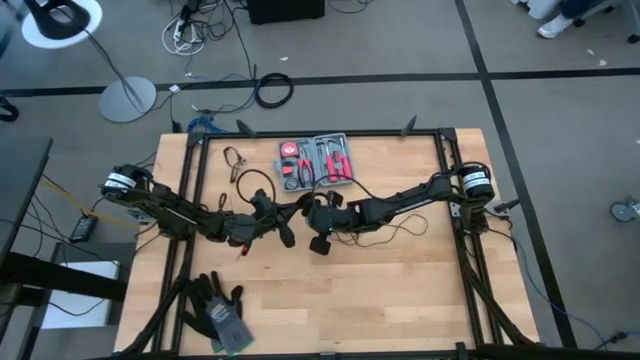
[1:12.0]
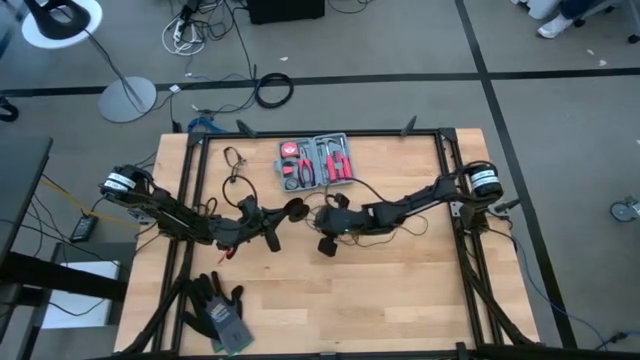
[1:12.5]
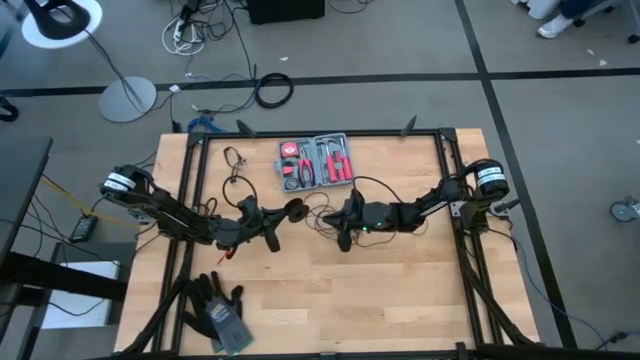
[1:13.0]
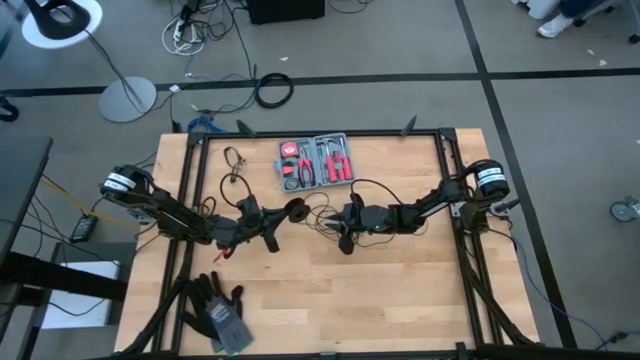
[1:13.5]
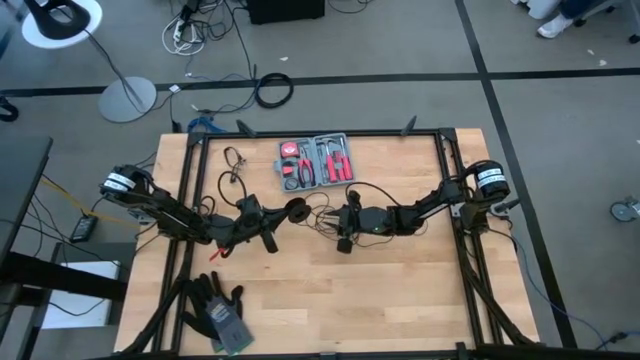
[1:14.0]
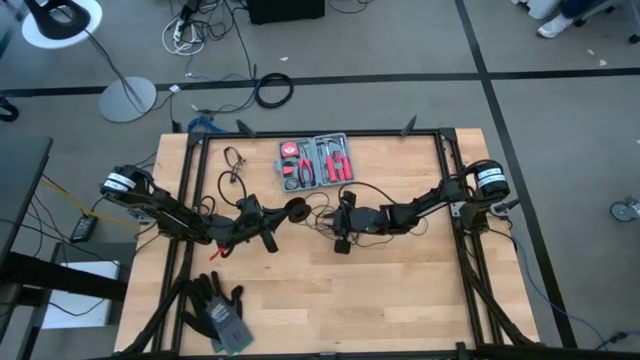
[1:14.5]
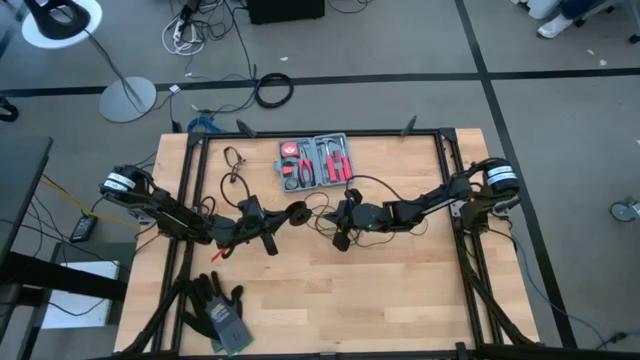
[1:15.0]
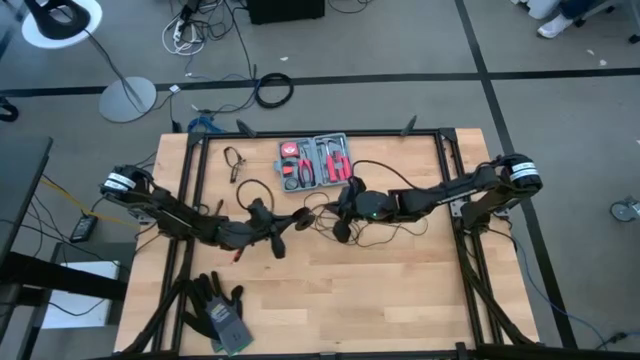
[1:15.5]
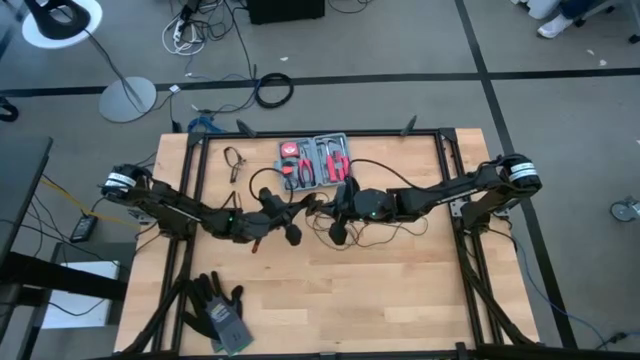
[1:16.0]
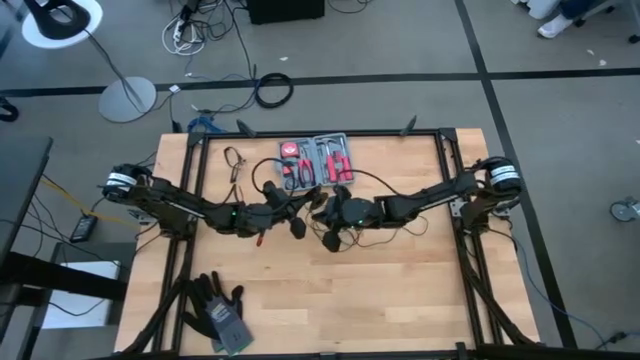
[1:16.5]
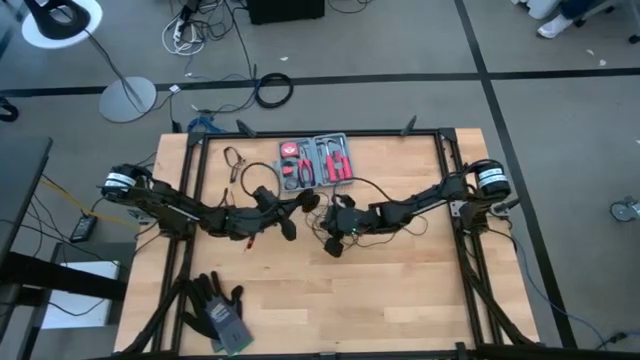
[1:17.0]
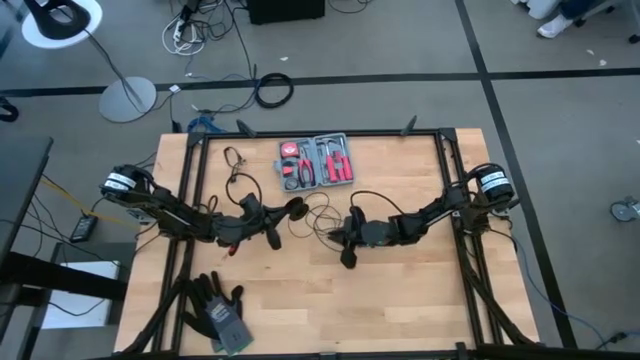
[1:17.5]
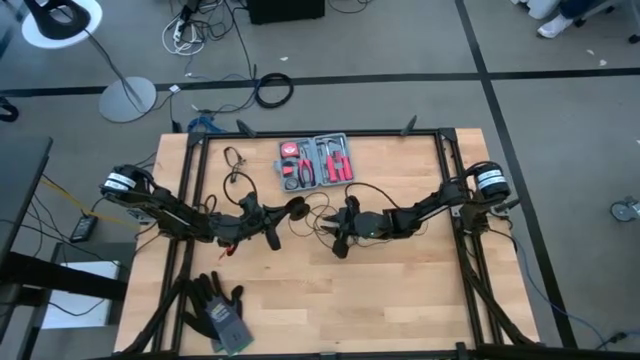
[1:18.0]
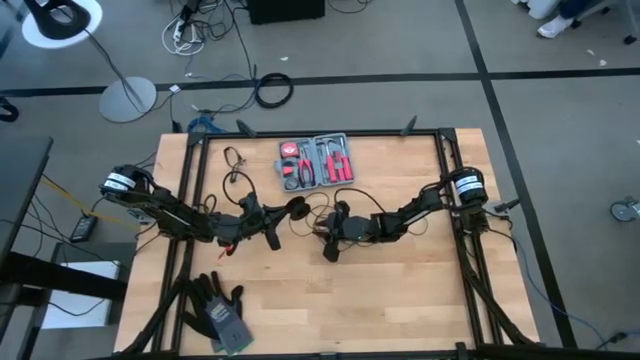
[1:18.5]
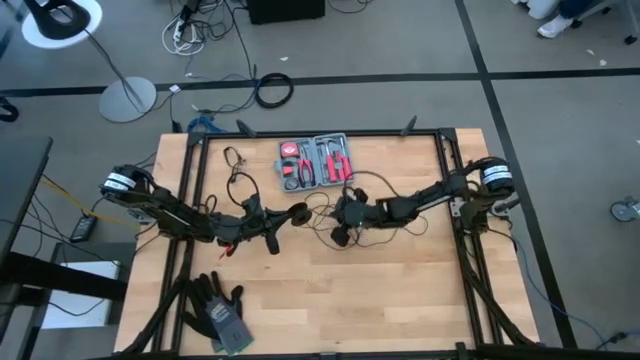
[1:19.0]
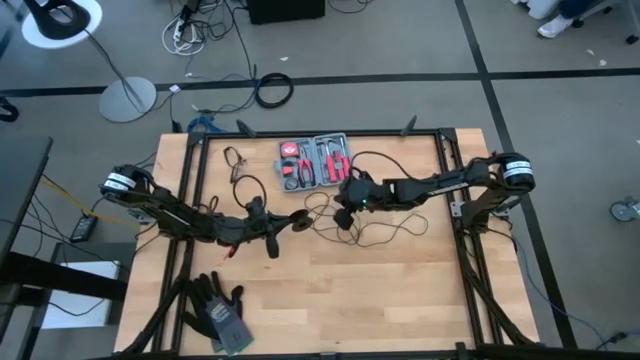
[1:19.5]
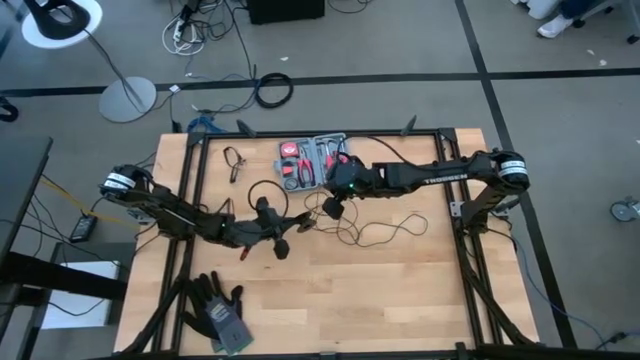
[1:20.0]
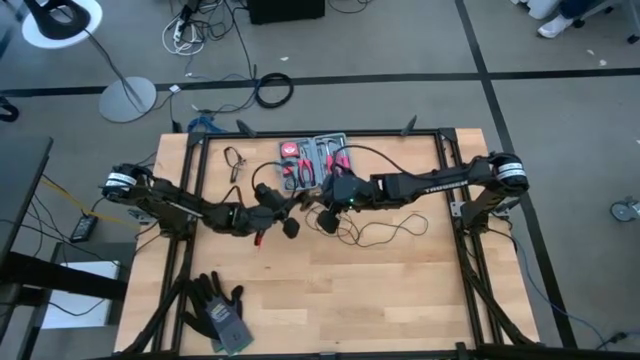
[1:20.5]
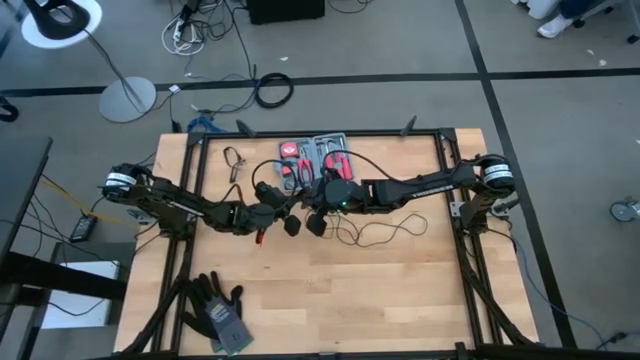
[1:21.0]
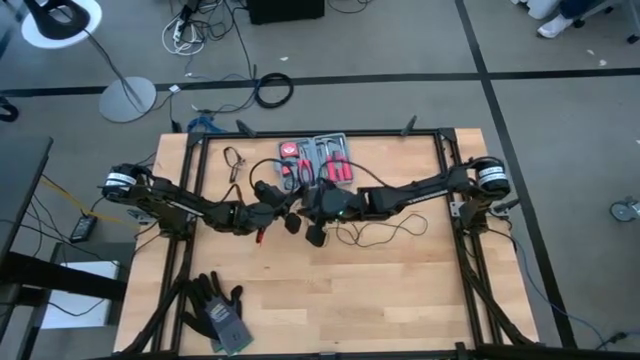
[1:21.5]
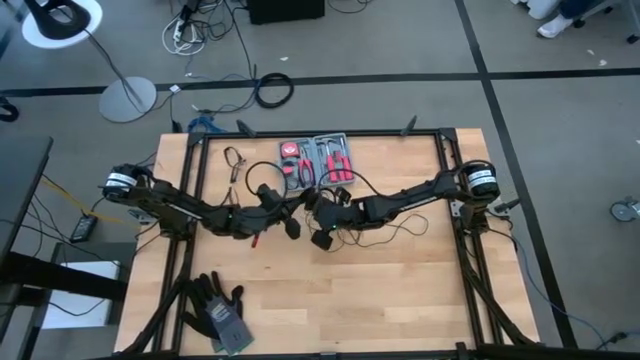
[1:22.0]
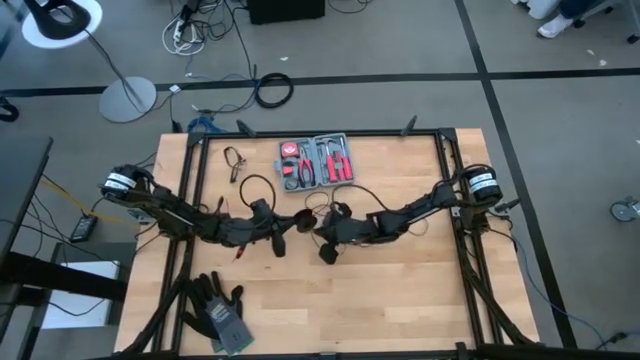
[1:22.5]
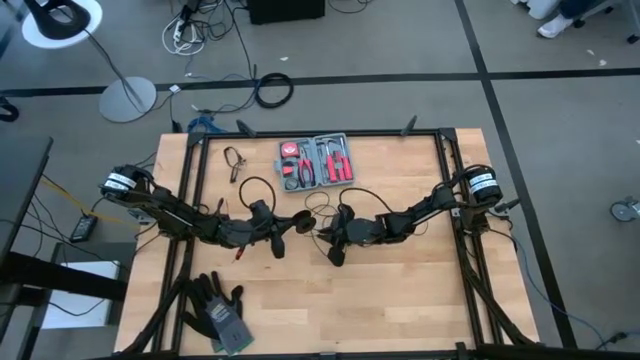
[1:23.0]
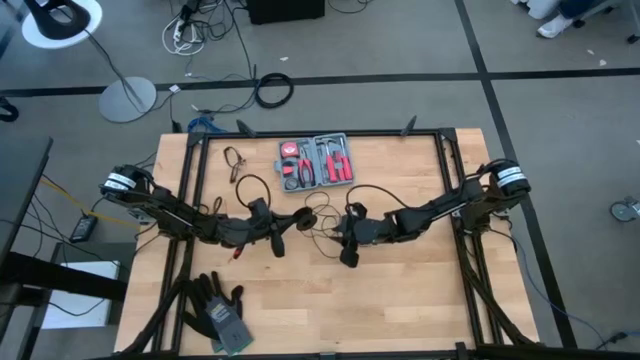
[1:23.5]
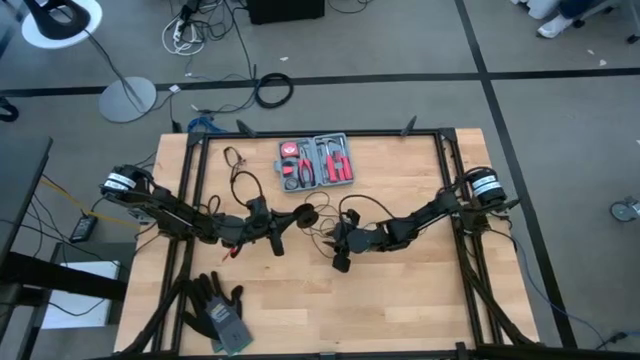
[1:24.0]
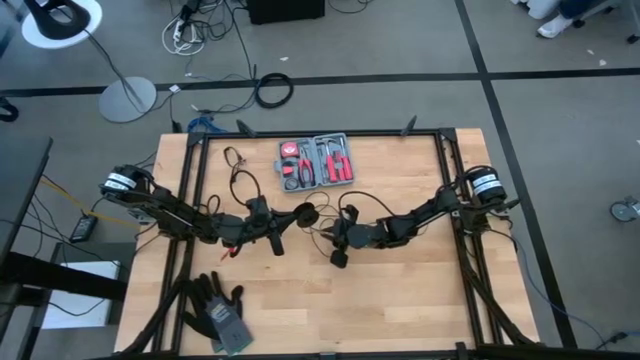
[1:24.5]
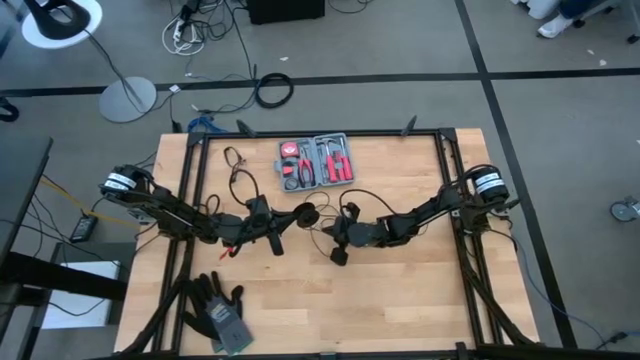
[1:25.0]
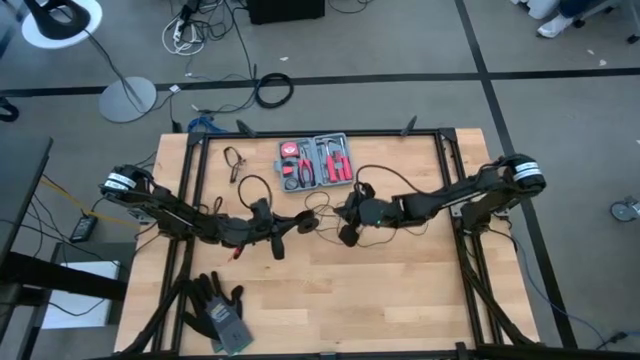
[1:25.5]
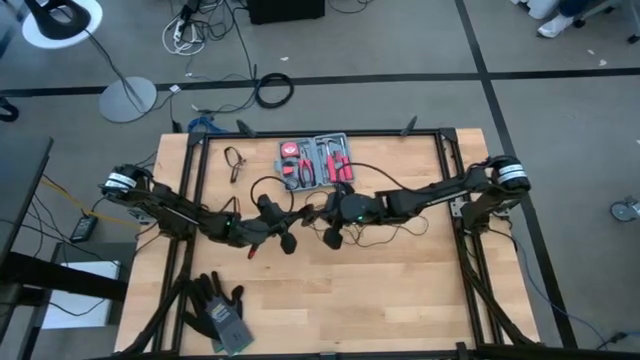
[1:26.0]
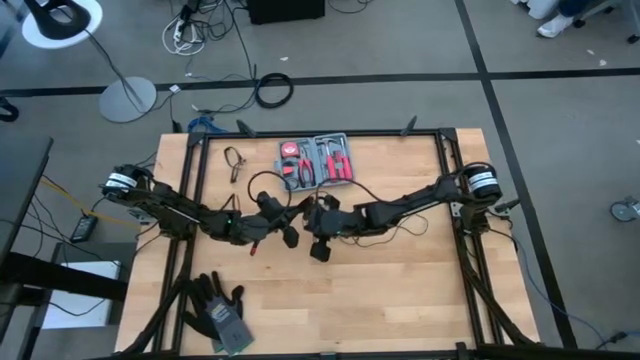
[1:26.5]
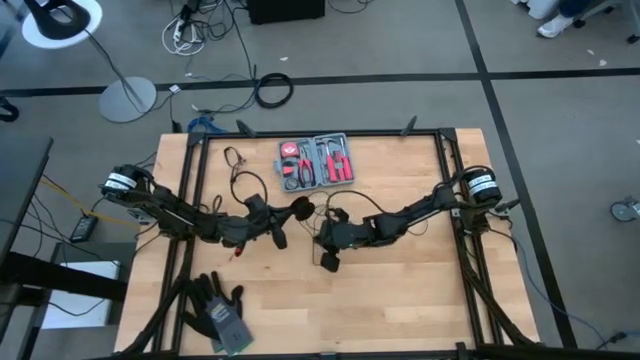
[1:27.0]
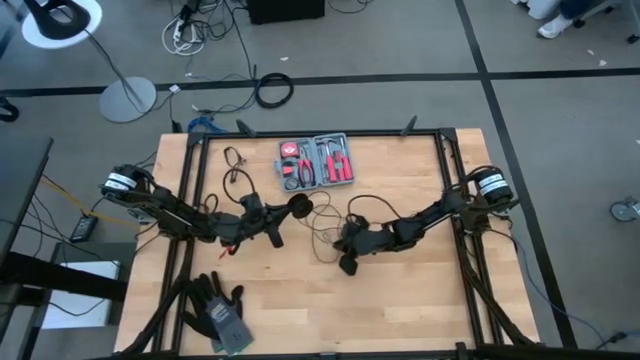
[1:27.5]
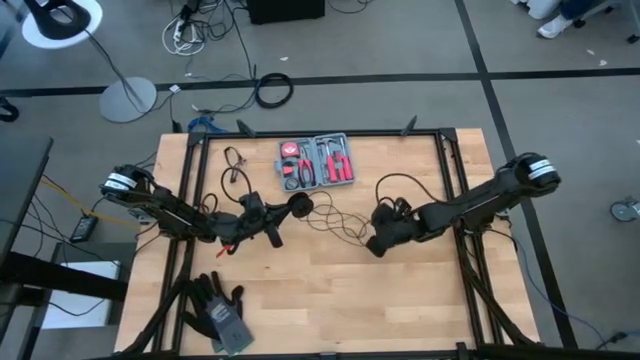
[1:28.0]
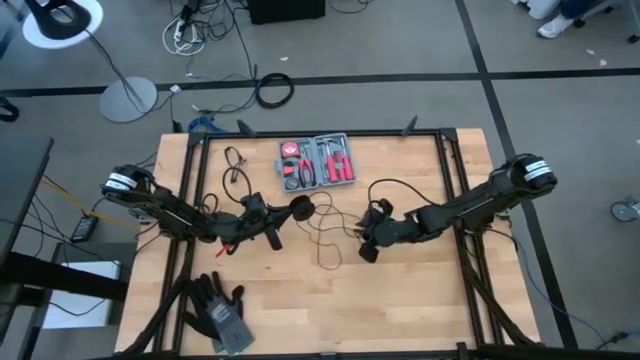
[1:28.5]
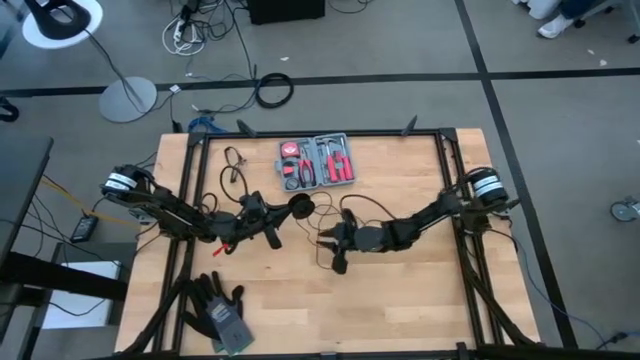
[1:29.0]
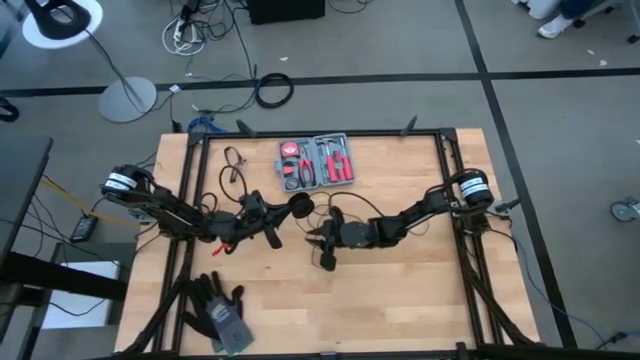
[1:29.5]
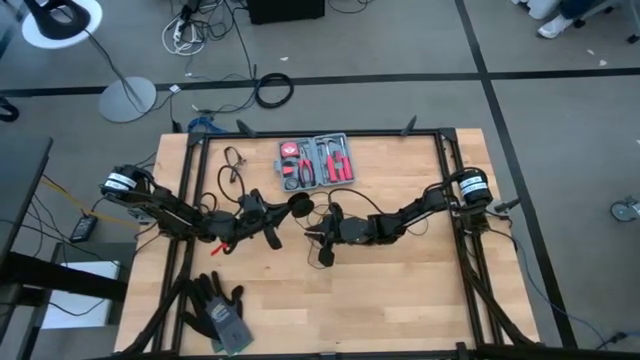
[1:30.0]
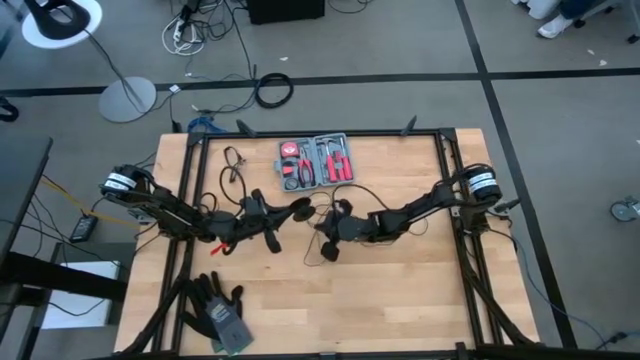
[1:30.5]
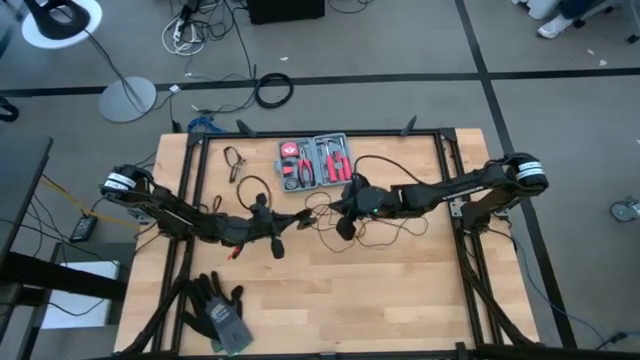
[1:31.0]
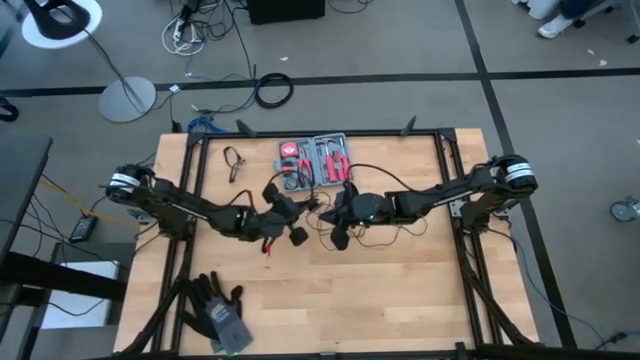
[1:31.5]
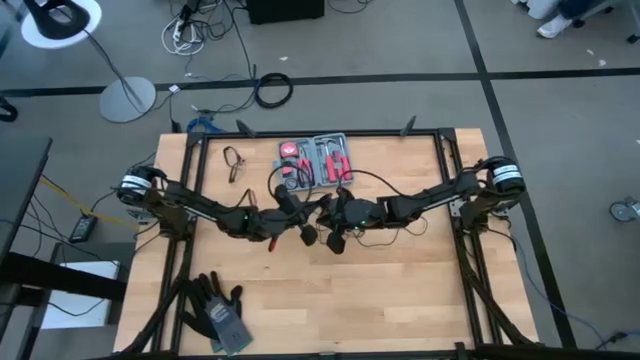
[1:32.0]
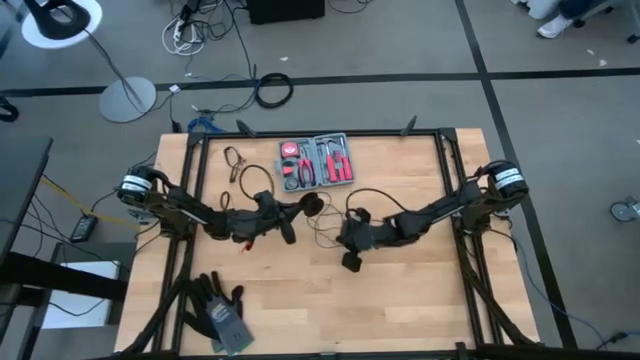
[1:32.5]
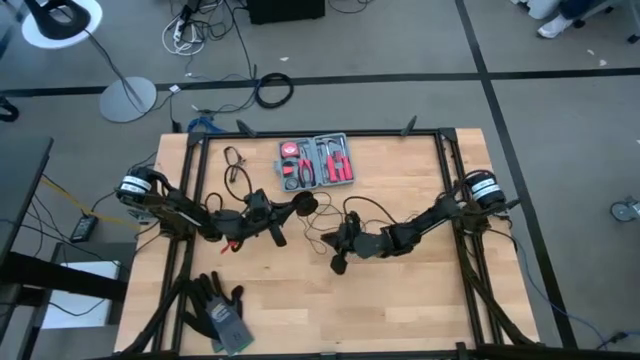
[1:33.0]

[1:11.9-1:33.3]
Task: Coil cords
Coil the black wire onto the black spool

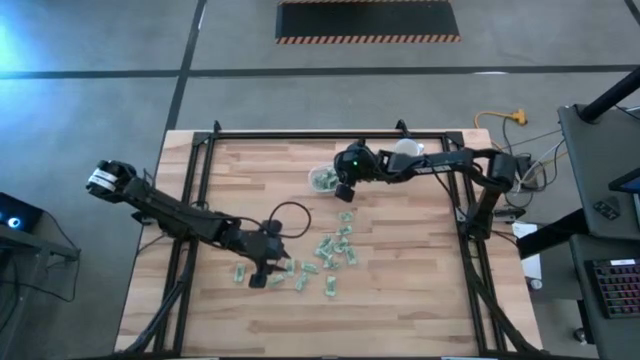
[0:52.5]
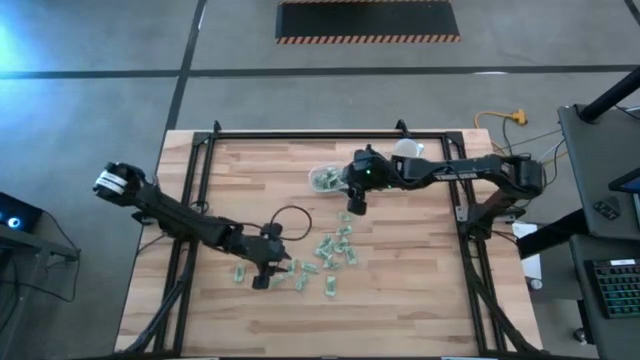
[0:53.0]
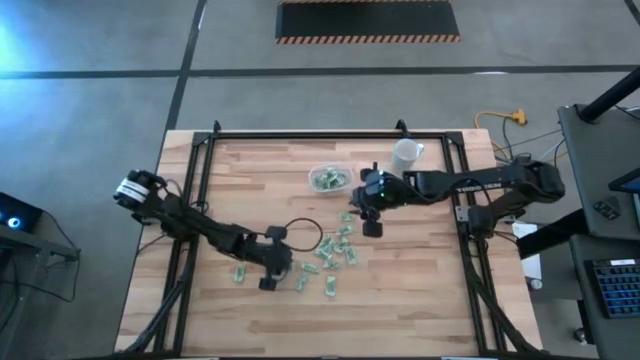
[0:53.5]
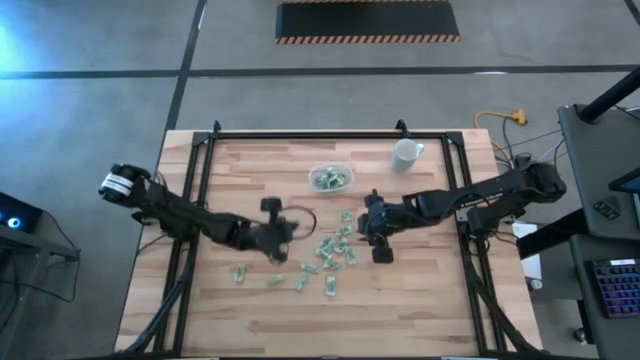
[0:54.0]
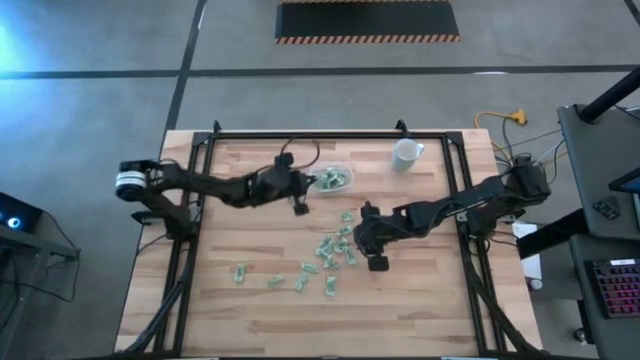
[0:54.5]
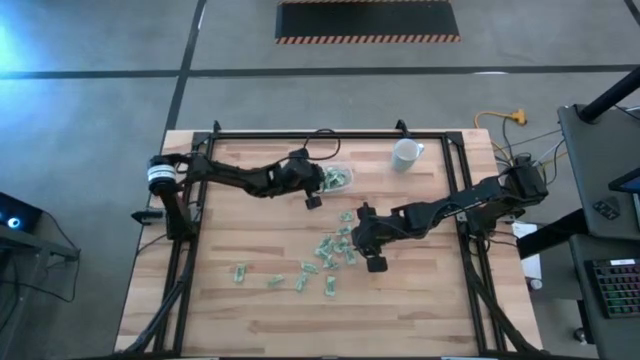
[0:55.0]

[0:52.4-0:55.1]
Task: Pick and place Stevia / Truvia into bins
Put the stevia packet into the transparent container
